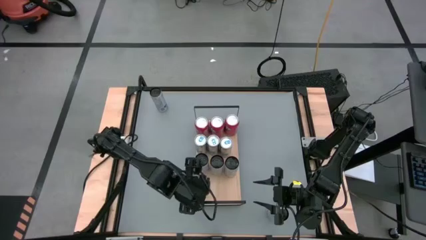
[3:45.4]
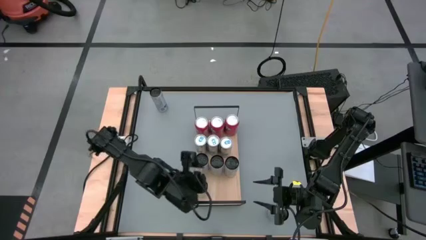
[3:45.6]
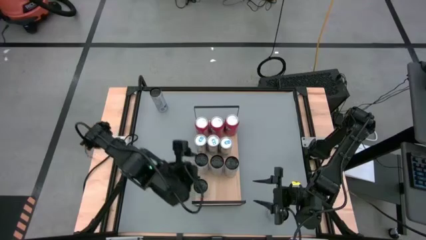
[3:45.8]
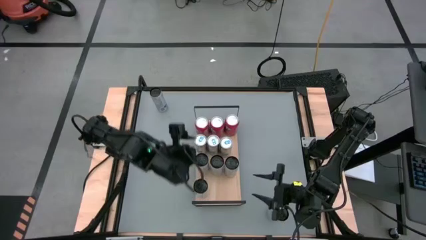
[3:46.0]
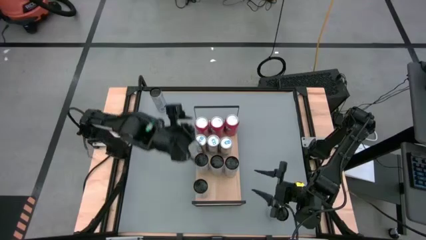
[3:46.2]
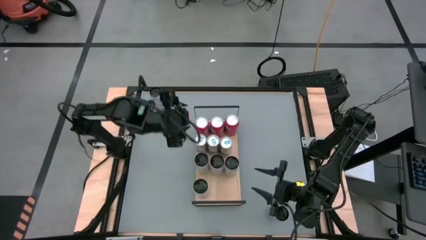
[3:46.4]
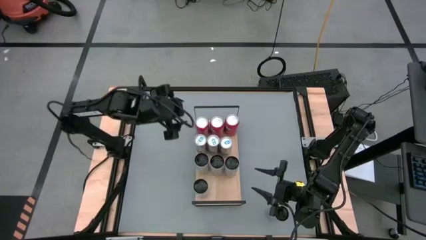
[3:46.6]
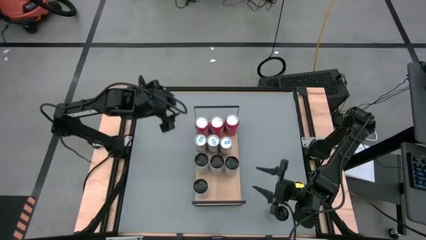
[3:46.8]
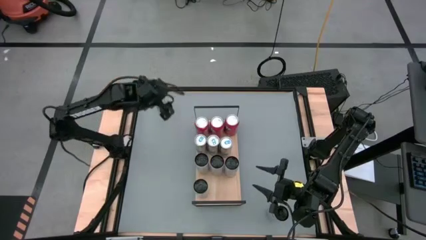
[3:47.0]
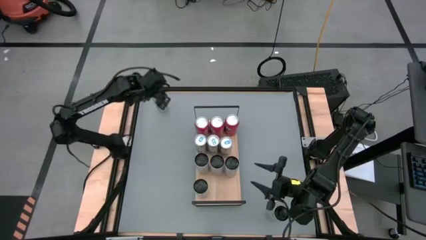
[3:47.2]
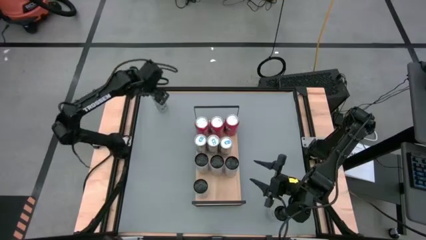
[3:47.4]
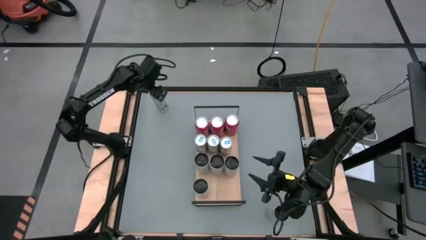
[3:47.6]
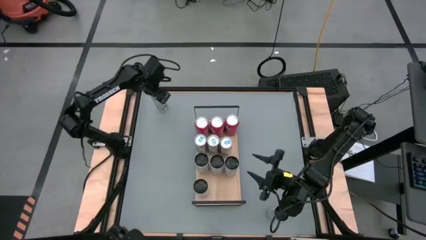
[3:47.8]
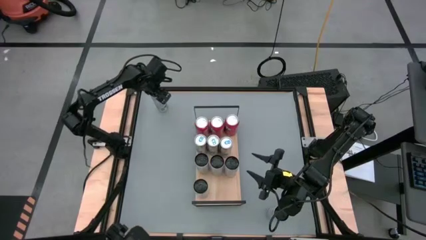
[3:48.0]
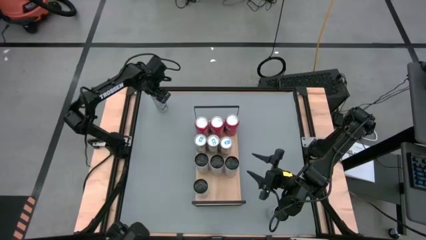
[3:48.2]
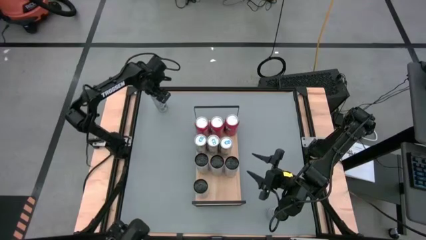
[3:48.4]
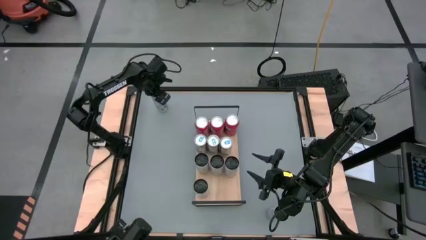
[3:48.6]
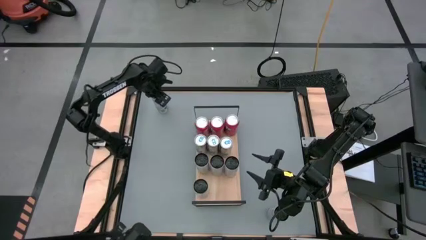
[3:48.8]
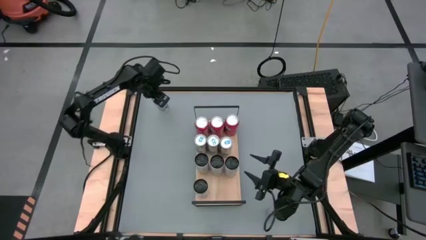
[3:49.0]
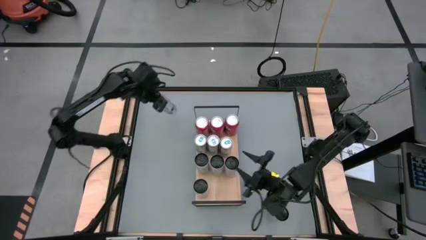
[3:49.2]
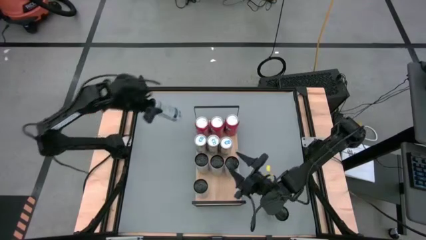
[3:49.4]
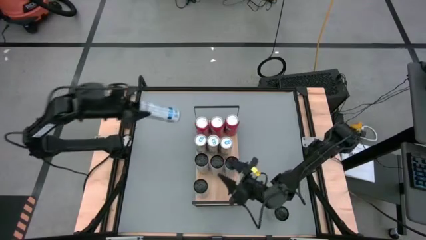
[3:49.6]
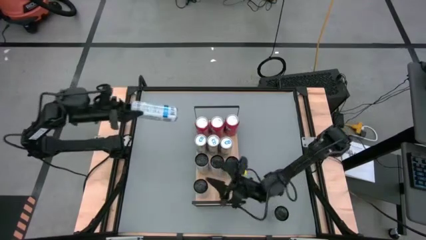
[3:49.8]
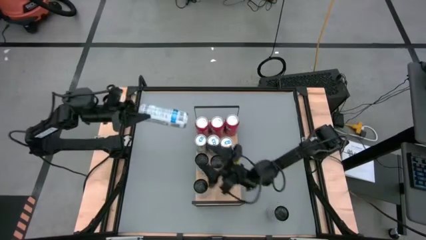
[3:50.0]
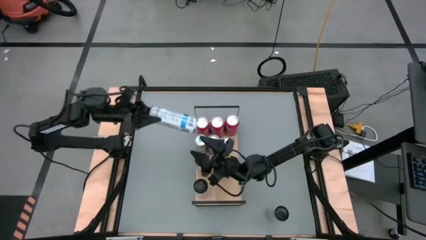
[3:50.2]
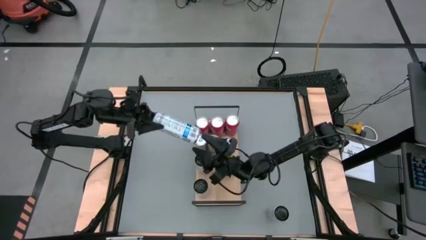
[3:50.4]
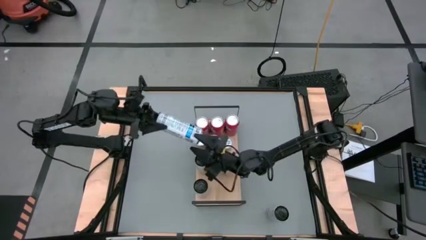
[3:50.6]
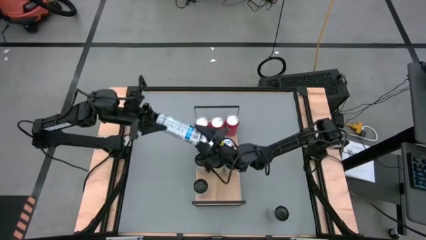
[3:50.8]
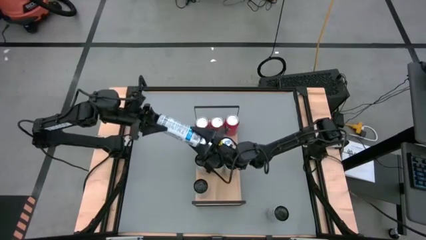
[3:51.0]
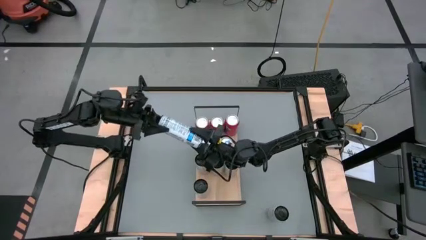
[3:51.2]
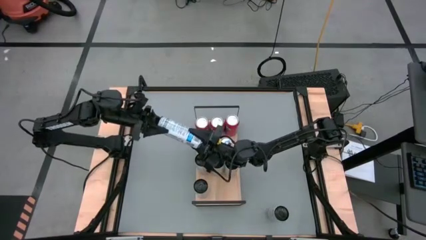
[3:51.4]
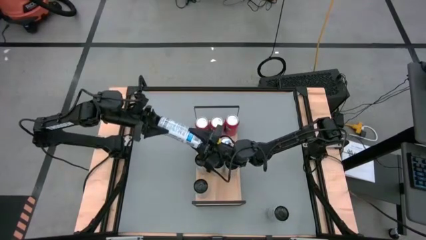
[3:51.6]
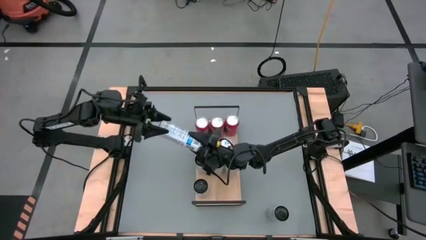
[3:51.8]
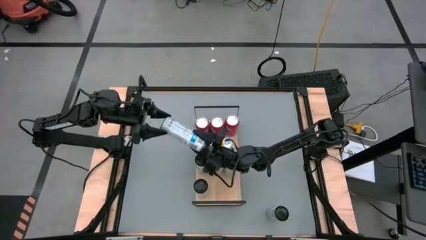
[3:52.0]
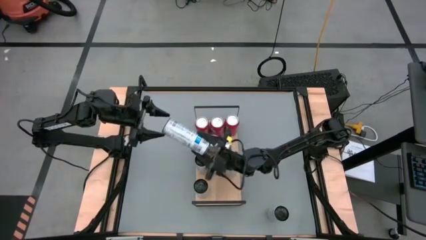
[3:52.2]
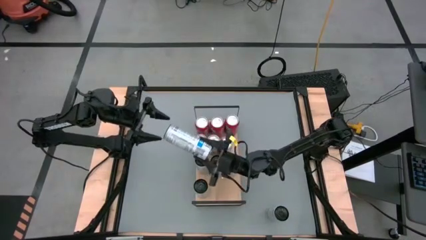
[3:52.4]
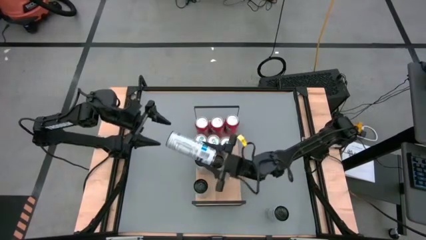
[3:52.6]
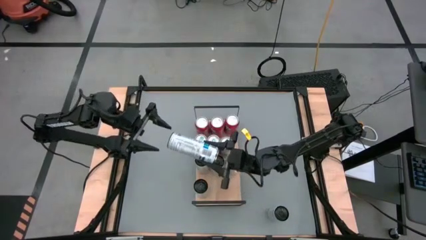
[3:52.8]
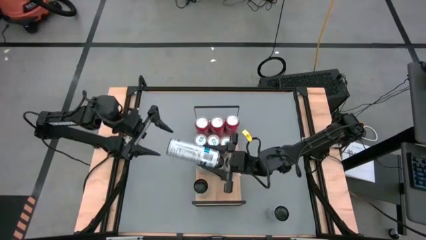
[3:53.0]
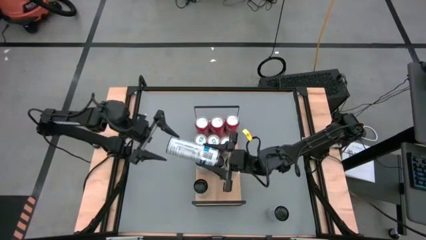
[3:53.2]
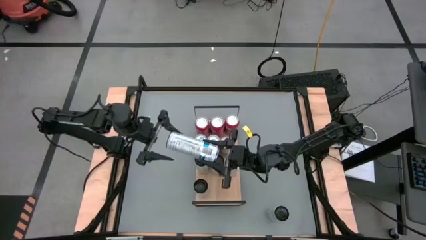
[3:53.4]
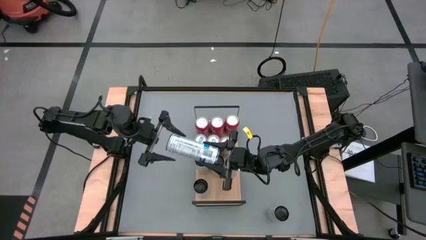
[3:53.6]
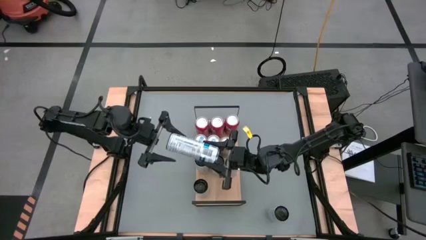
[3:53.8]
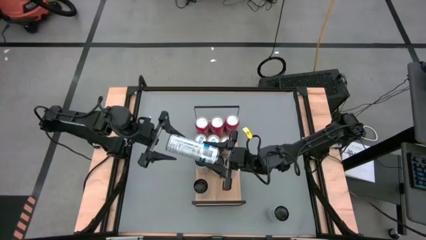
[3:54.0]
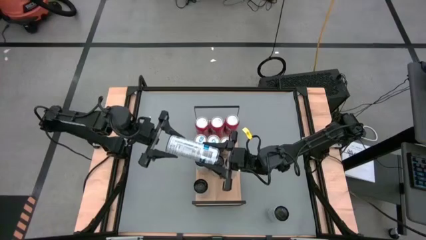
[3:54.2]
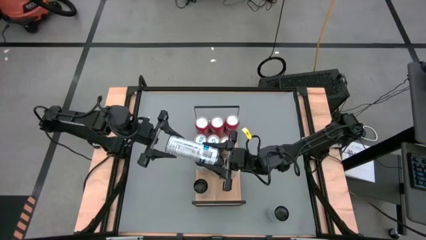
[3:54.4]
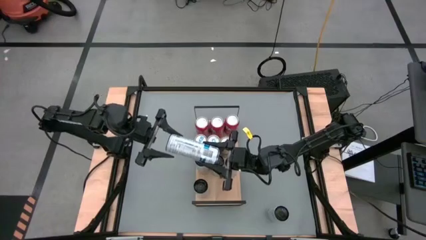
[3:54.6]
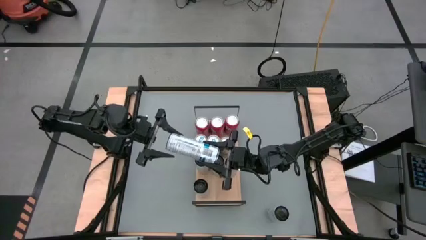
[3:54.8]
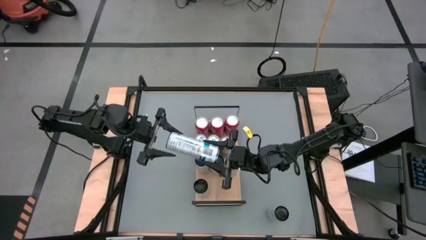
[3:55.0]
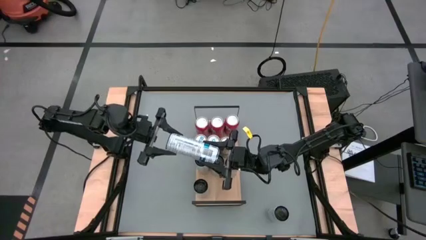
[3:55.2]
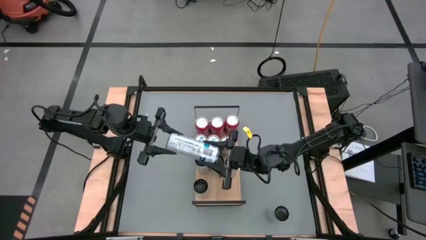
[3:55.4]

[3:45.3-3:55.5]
Task: Place canned beverage on shelf
Put the top white-blue soda can aligned with the other white-blue soda can on the shelf
